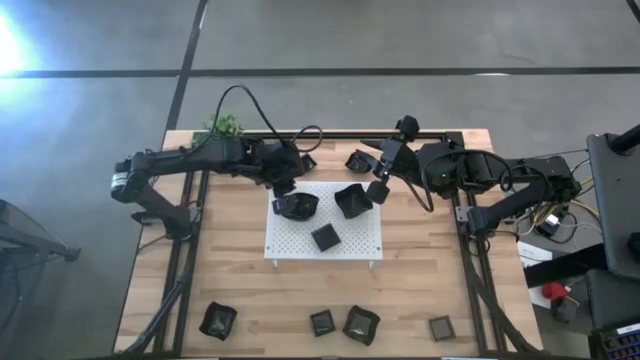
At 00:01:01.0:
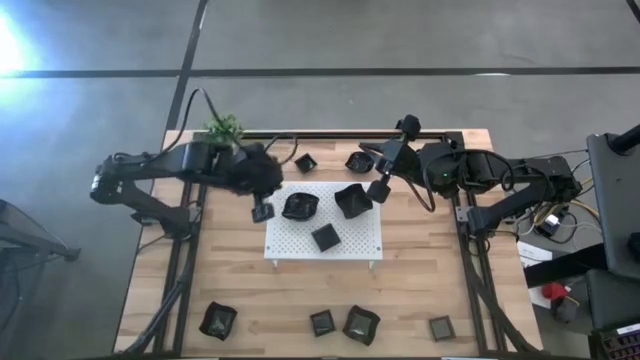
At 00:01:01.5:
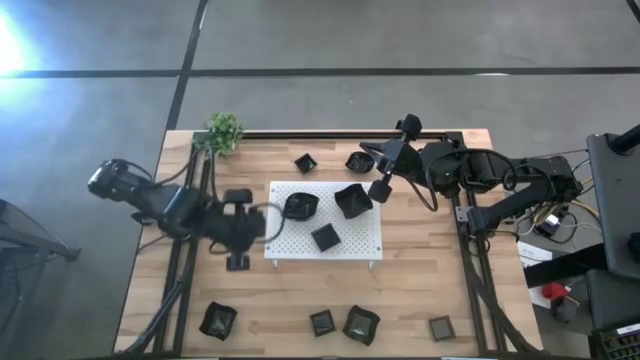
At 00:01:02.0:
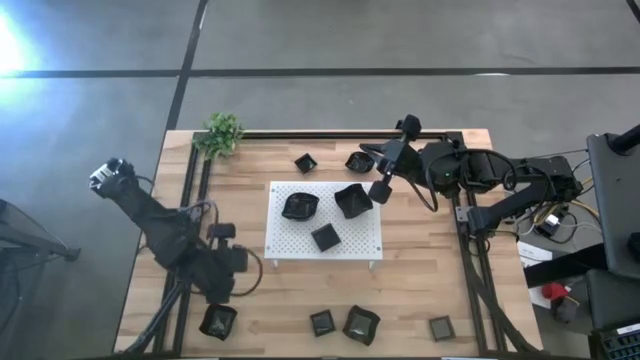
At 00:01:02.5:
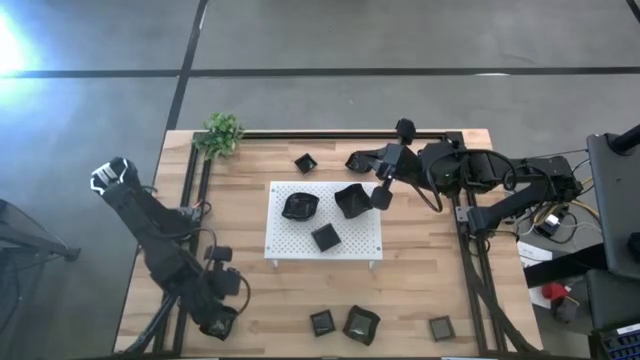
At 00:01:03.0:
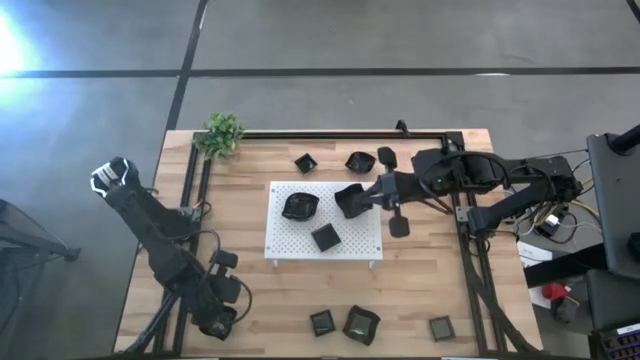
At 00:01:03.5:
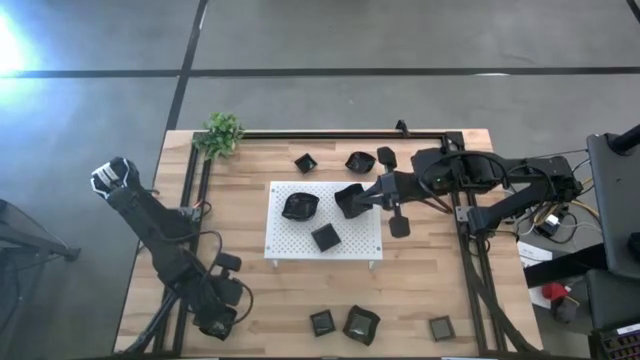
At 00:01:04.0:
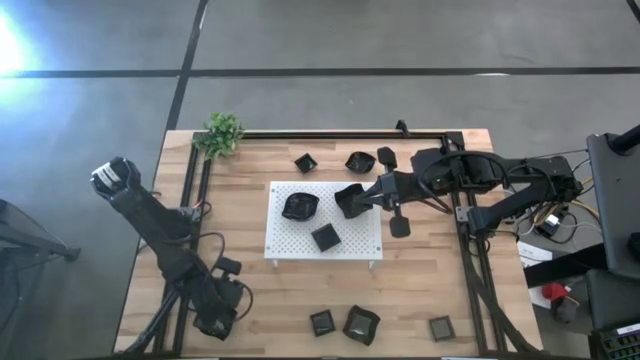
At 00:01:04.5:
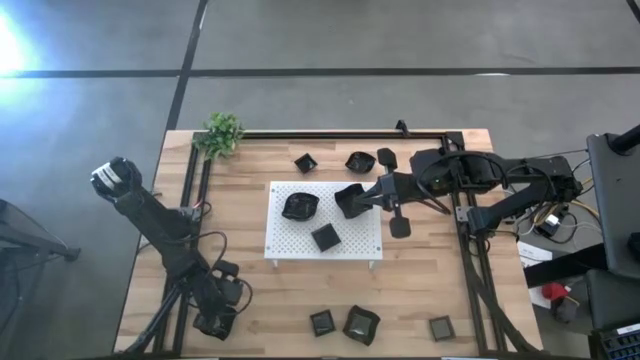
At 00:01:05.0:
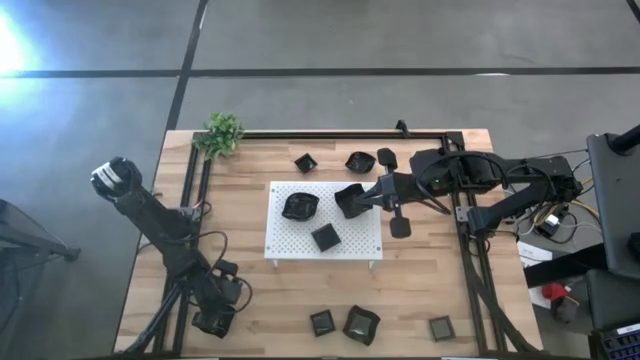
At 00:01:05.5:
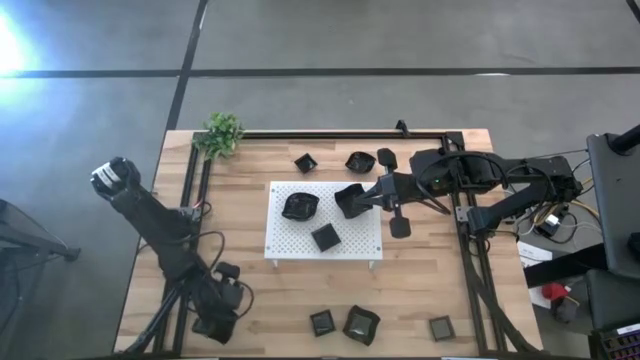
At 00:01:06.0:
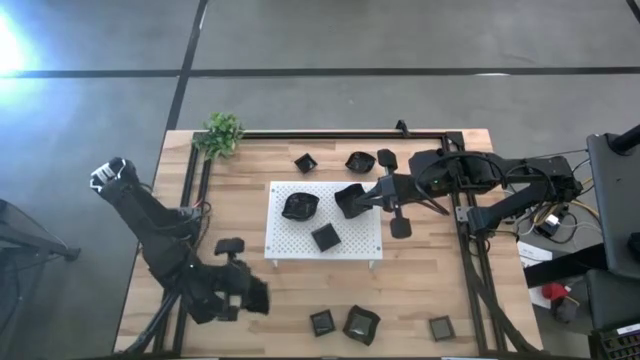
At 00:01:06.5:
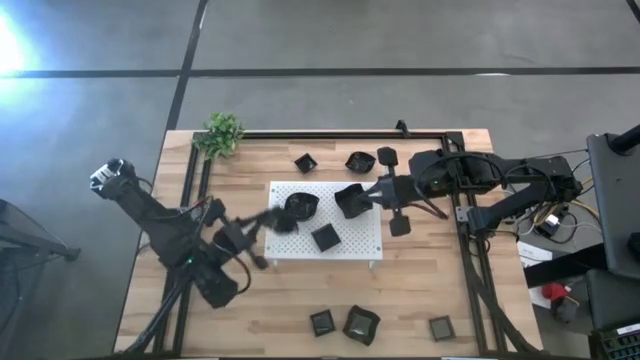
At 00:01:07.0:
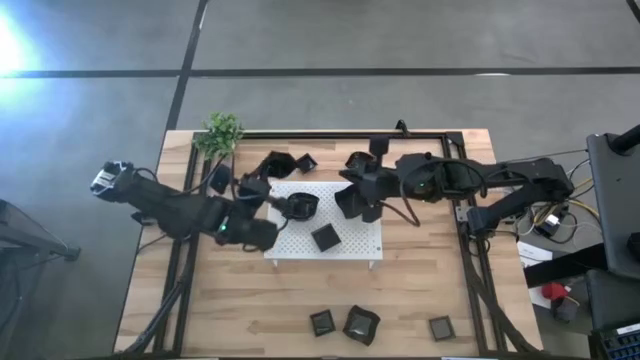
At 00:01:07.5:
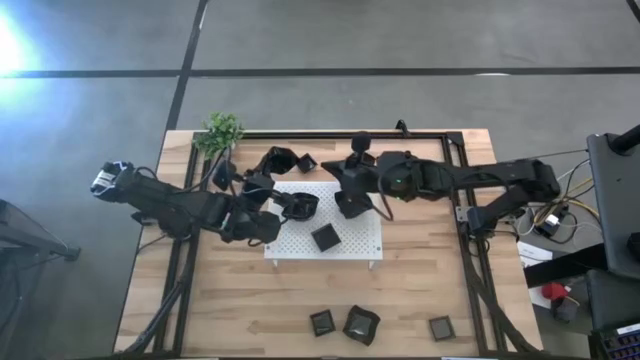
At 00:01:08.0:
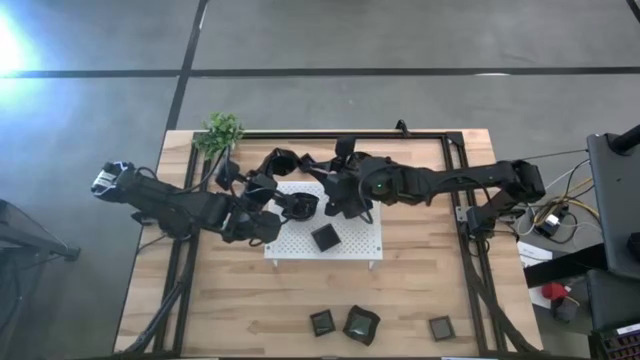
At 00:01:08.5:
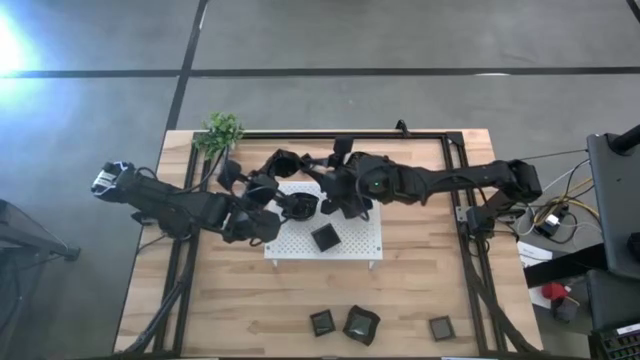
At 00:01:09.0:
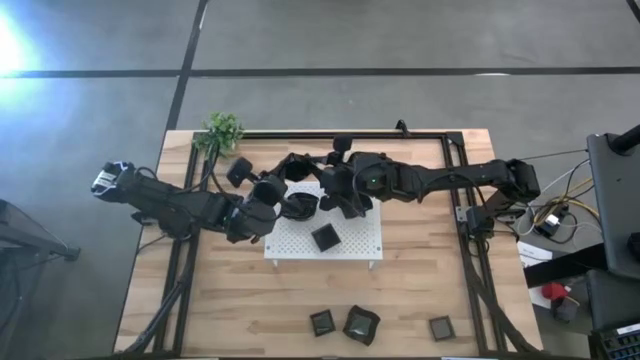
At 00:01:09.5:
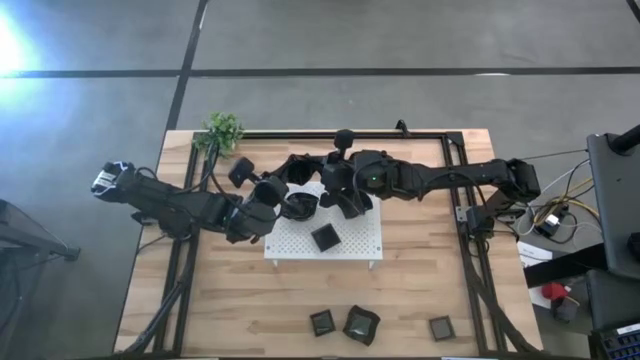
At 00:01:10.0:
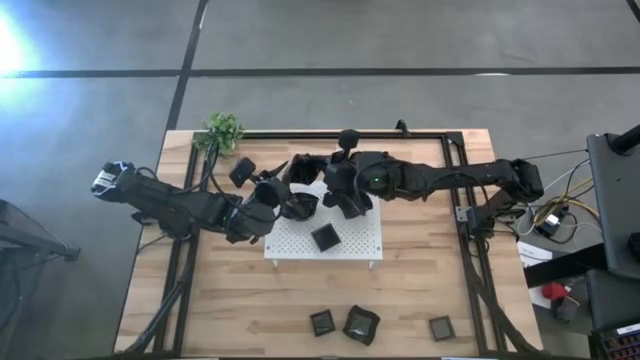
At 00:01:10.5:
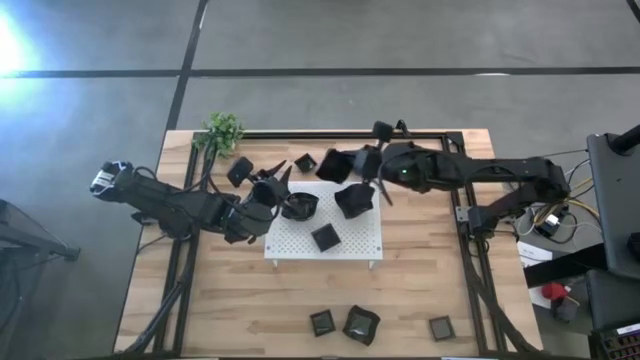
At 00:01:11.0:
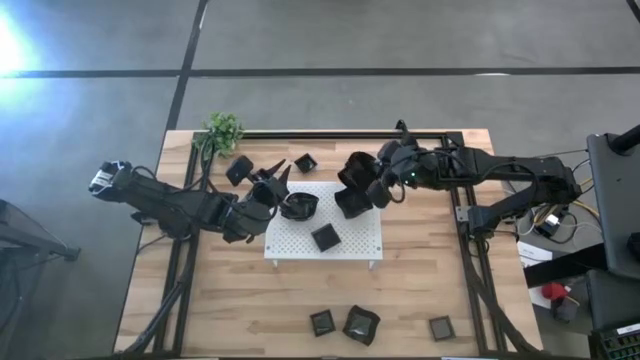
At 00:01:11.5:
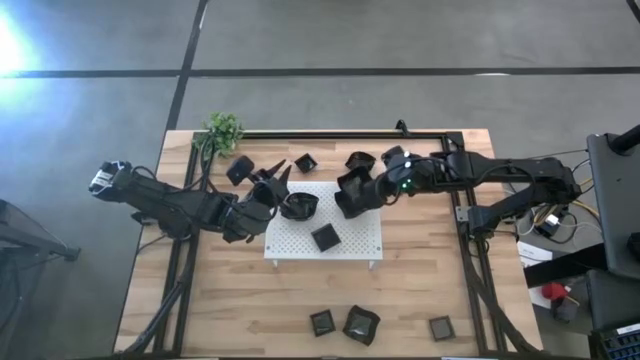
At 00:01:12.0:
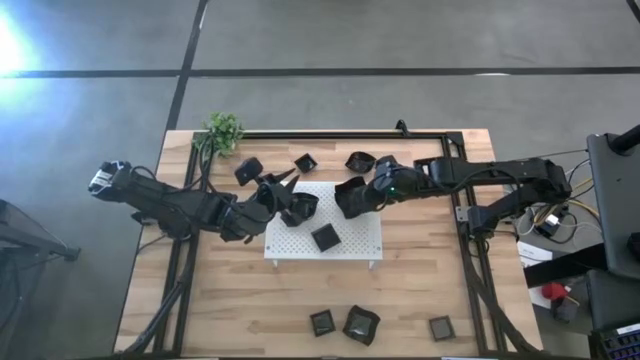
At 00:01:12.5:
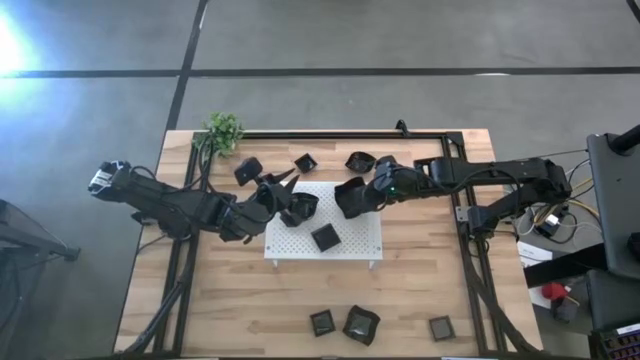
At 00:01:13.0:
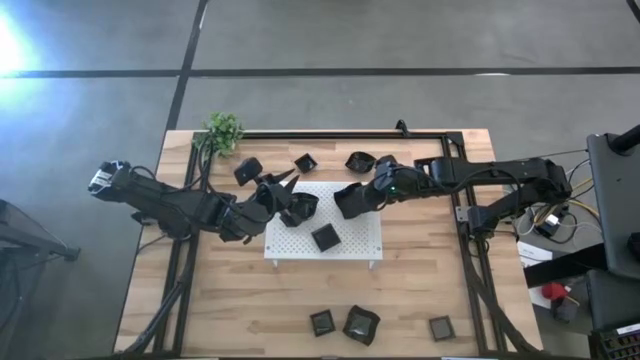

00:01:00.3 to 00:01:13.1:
Task: Pick & Place Mini shaped plates
Stack the black distorted square plate on top of the black distorted square plate on the shelf

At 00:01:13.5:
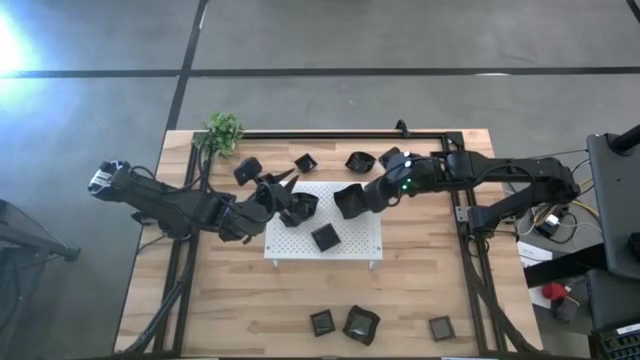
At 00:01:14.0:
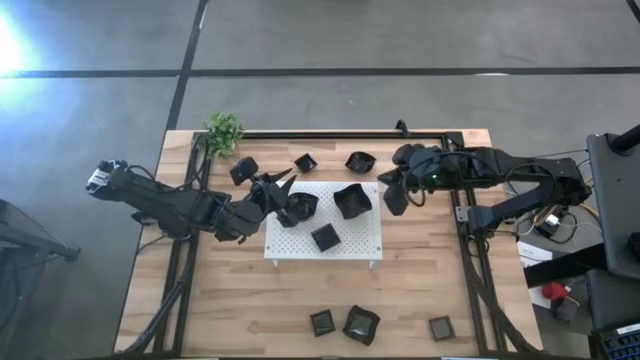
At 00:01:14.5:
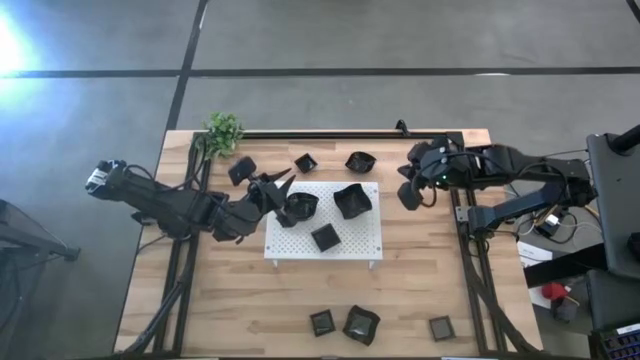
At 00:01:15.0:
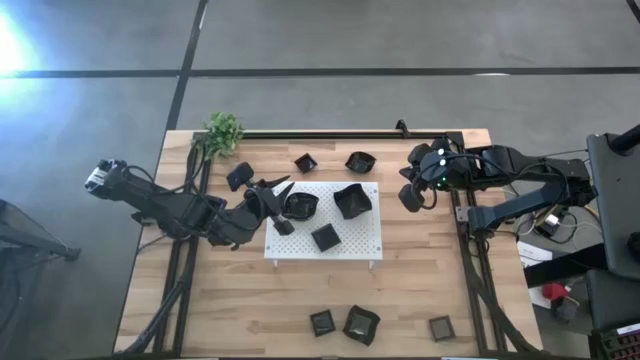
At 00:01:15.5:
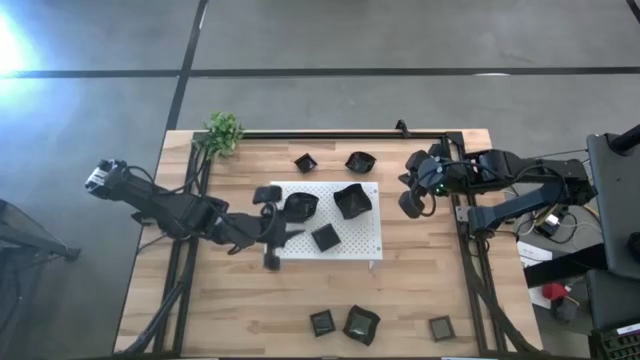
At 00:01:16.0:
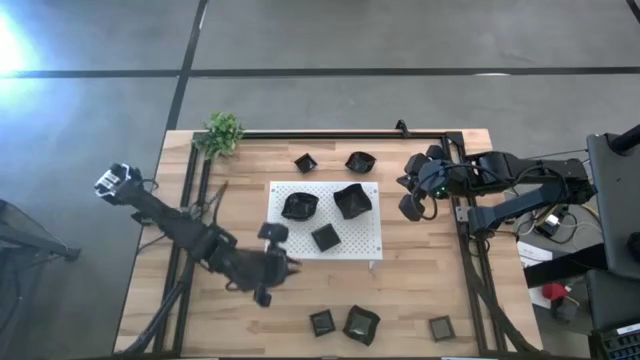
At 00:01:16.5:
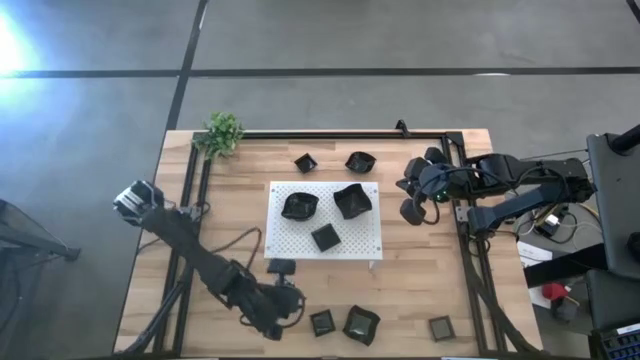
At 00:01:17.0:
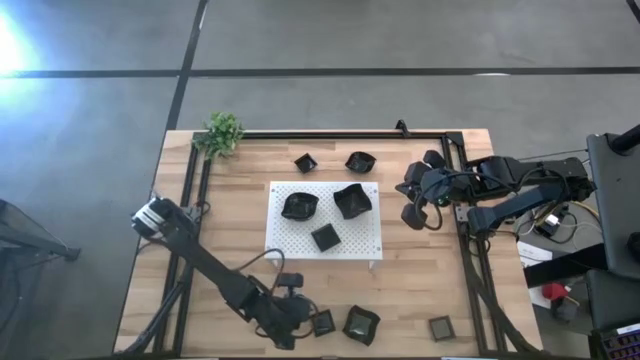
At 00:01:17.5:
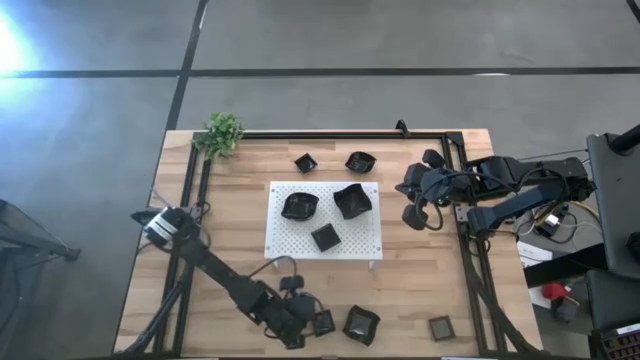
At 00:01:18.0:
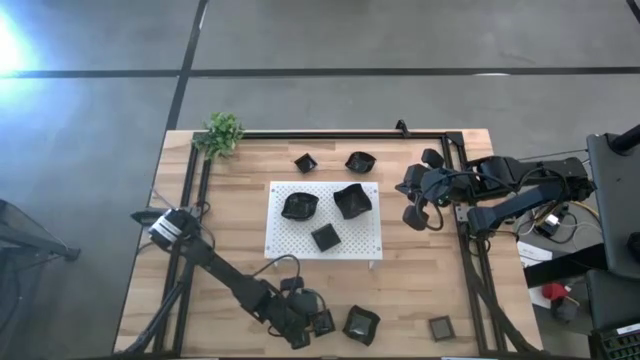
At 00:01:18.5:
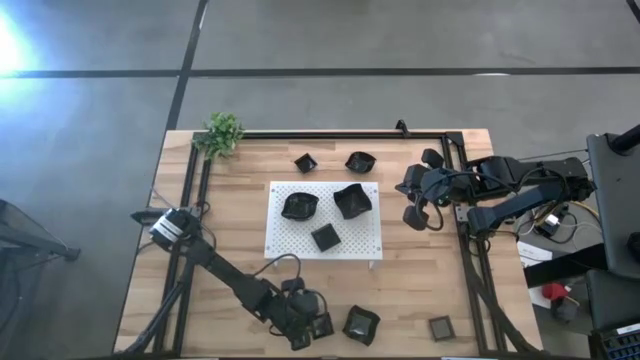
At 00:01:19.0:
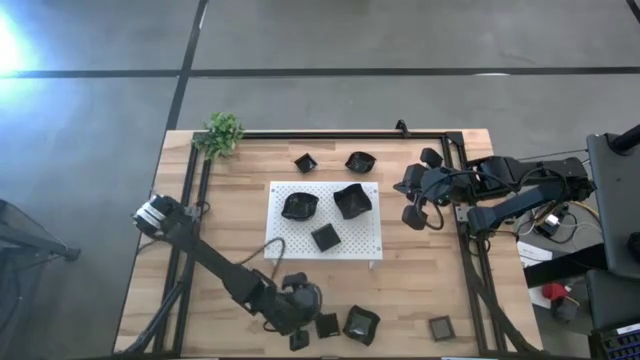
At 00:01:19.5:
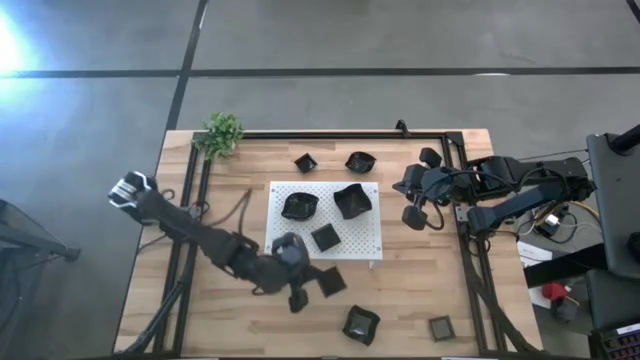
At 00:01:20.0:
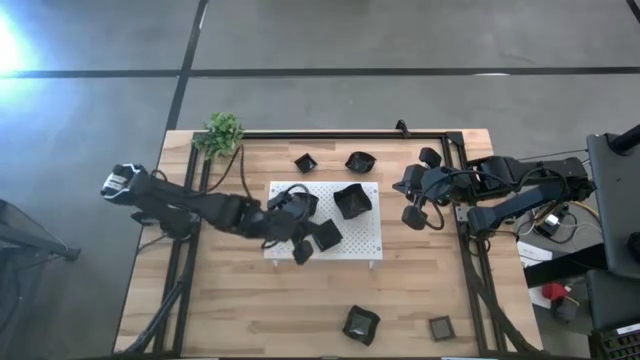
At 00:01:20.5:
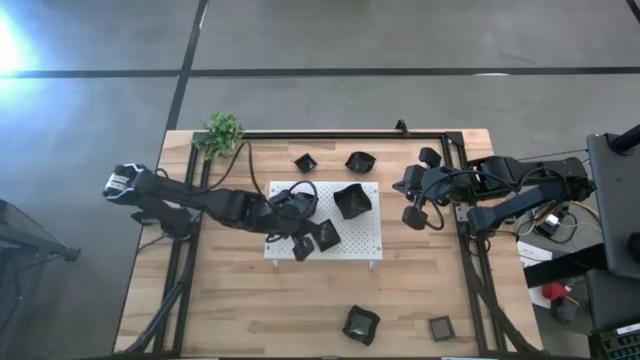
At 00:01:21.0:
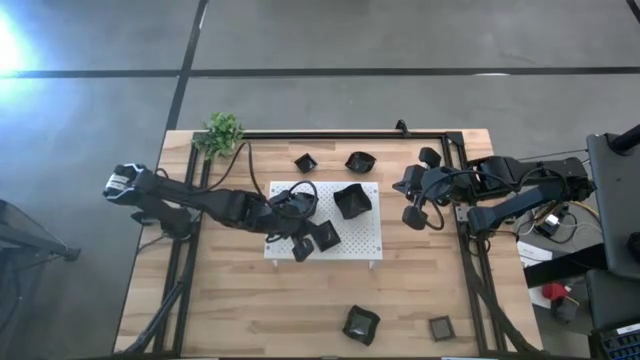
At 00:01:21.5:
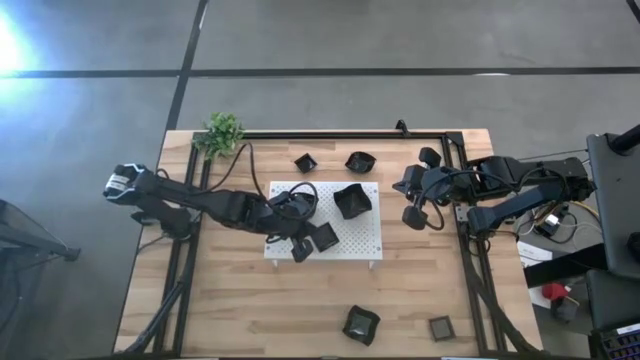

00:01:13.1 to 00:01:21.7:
Stack the black square plate on top of the black square plate on the shelf
